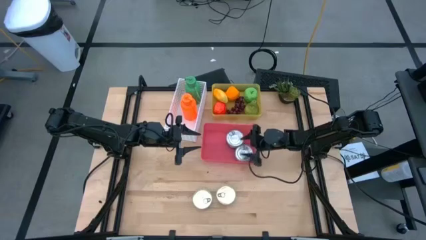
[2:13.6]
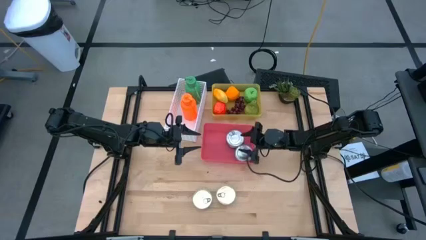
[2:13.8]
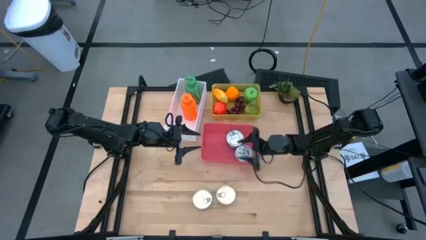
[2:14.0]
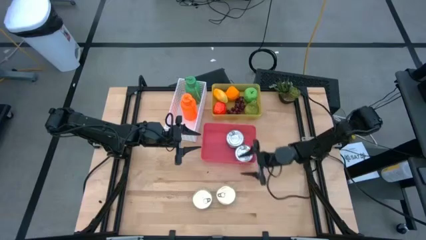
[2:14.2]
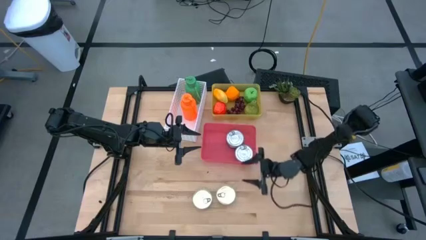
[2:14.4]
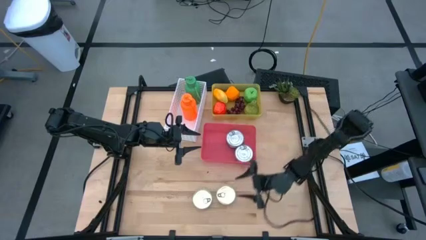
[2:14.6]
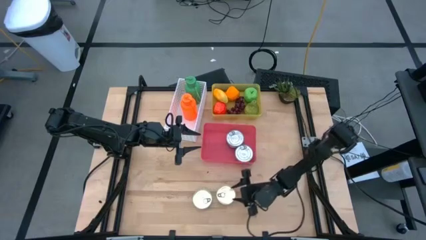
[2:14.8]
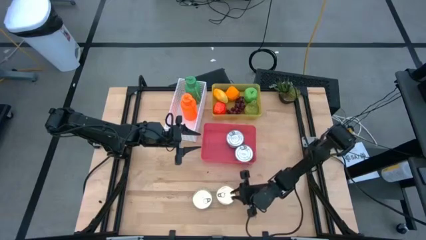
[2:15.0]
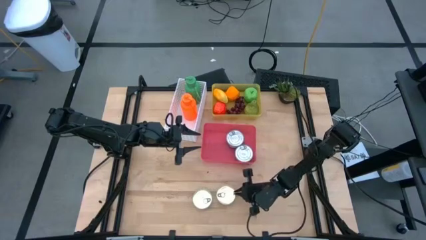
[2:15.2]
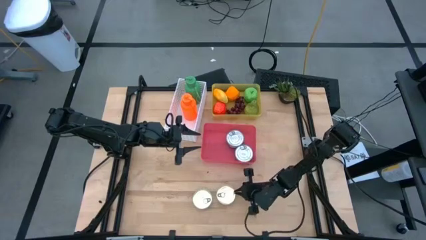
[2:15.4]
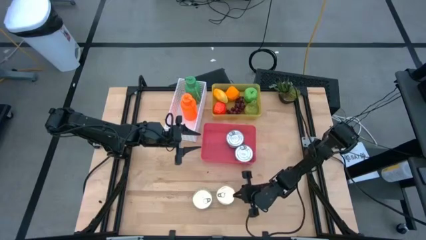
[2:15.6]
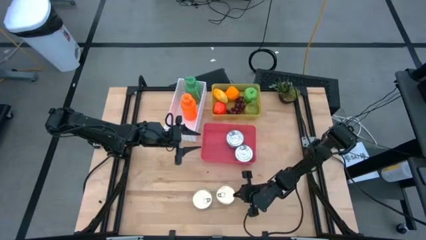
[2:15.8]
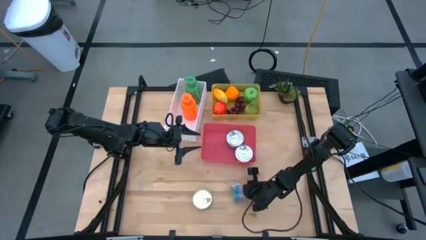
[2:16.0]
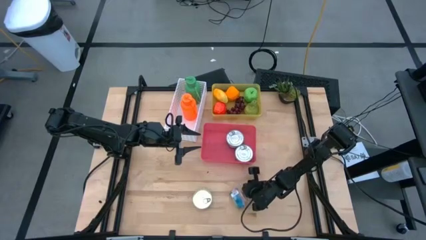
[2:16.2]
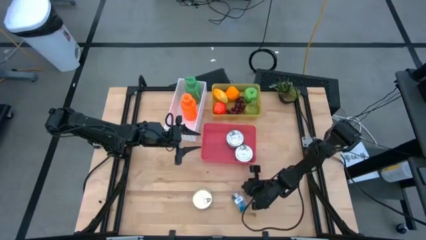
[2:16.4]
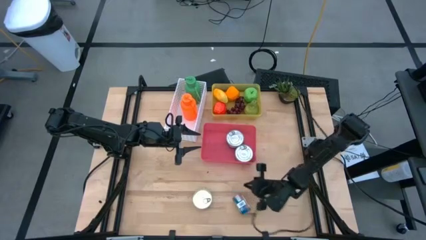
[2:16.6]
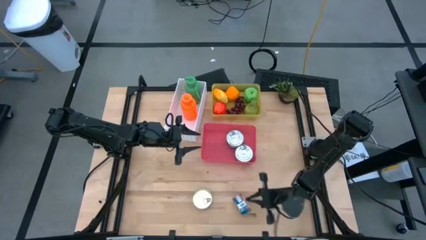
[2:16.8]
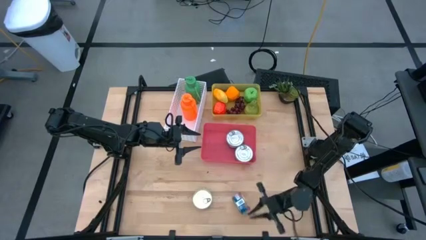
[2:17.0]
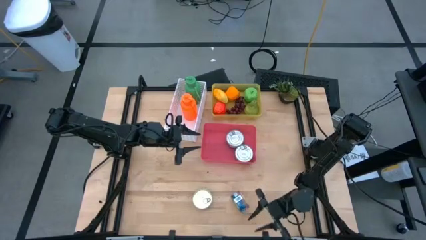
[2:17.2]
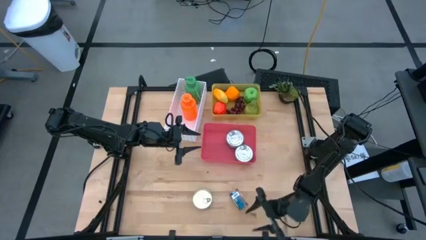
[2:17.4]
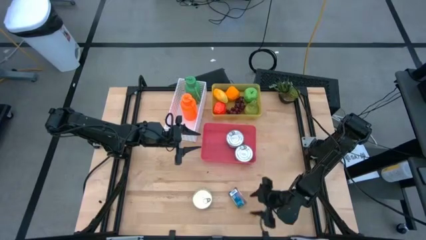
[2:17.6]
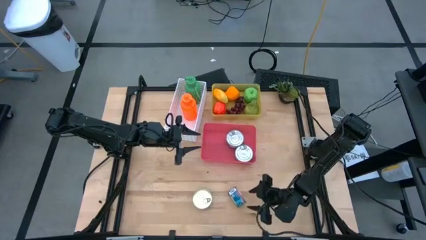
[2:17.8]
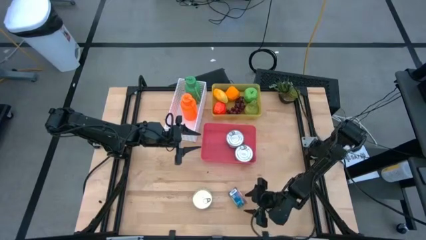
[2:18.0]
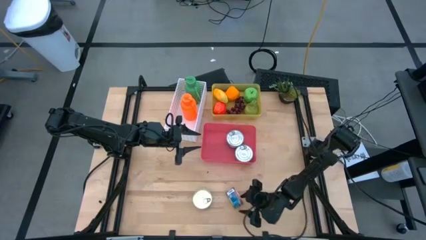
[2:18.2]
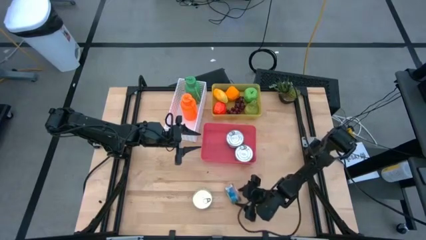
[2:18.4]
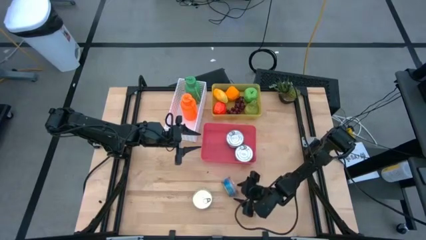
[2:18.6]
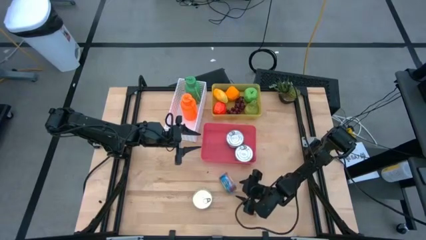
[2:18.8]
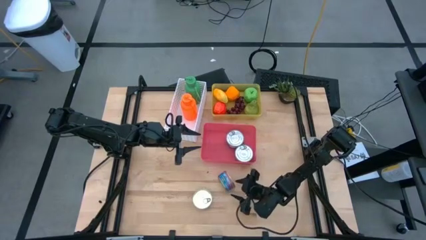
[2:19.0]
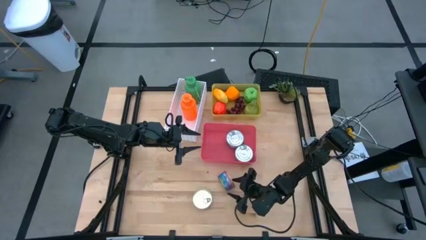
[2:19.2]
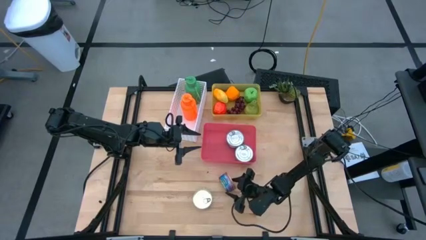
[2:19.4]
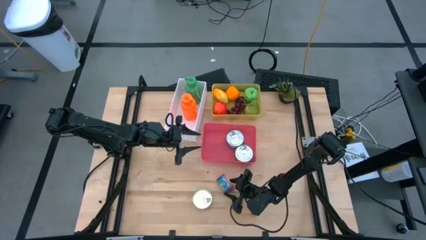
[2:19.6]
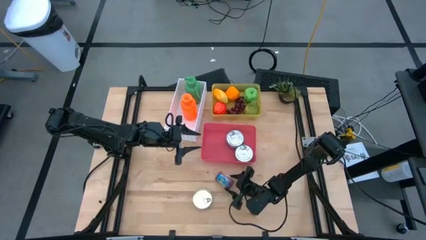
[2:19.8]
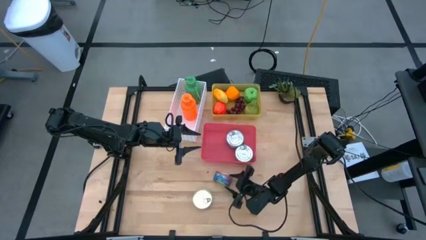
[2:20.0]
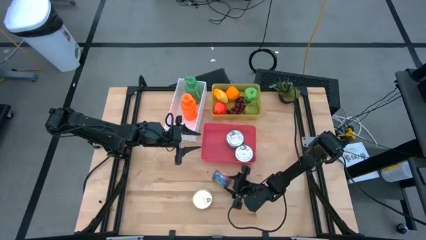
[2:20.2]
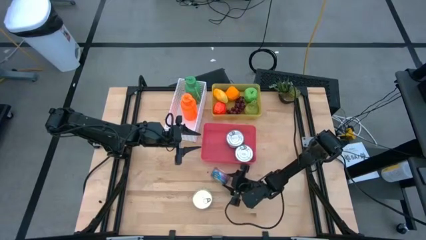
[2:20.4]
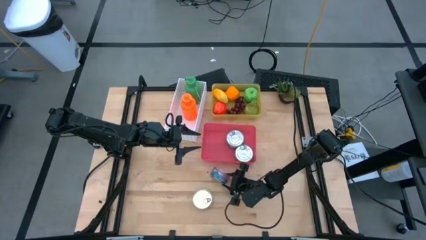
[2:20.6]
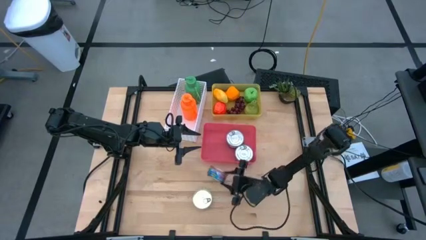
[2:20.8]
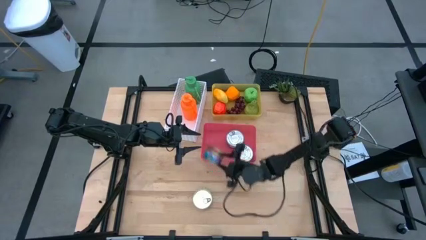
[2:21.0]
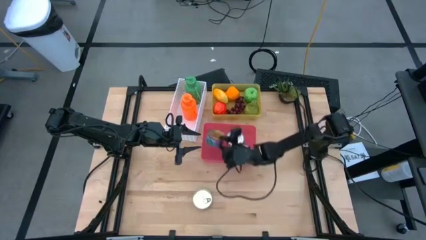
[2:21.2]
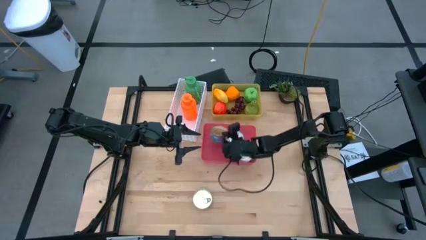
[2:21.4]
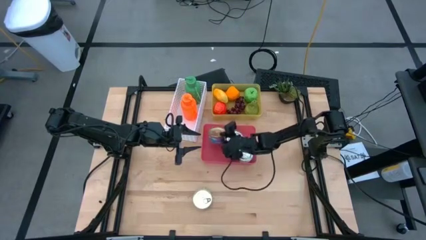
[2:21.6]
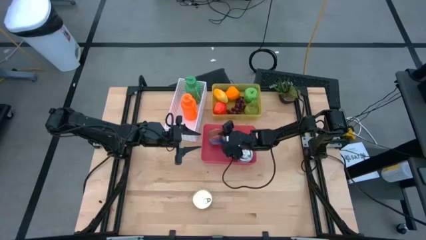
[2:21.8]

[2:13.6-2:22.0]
Task: Pick & Place Food Item
Put the right blue and pink tuna can into the red bin

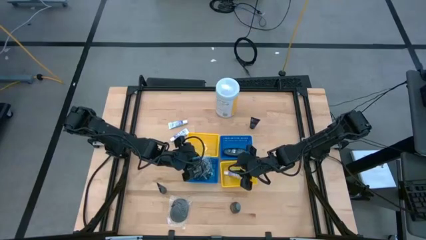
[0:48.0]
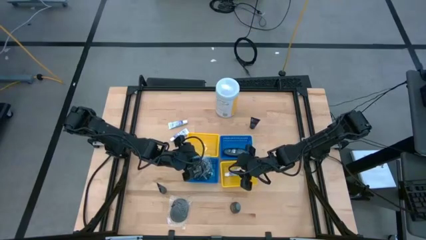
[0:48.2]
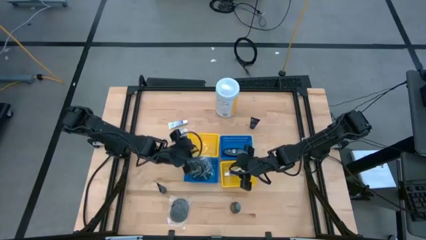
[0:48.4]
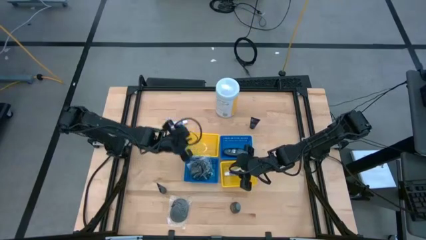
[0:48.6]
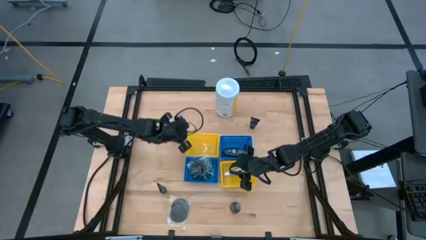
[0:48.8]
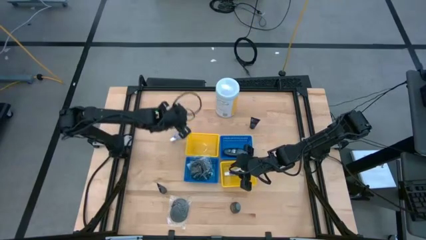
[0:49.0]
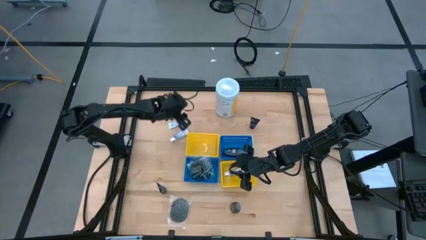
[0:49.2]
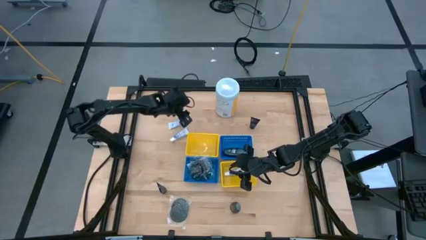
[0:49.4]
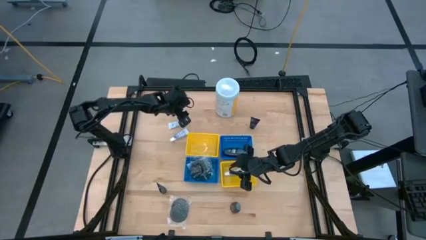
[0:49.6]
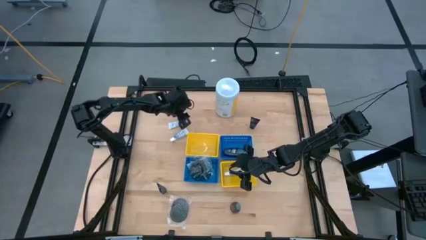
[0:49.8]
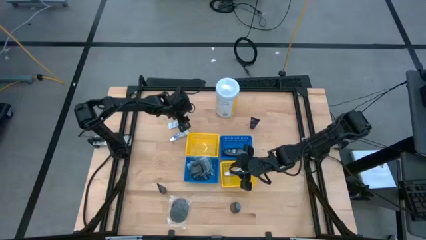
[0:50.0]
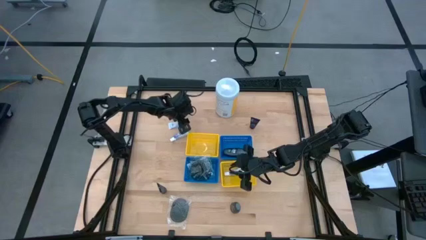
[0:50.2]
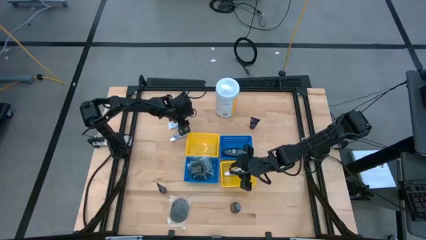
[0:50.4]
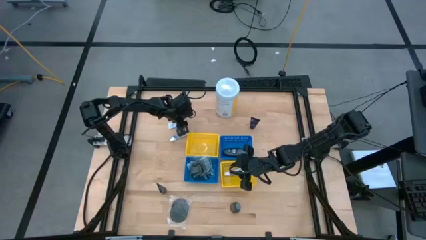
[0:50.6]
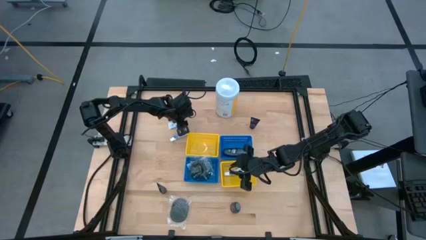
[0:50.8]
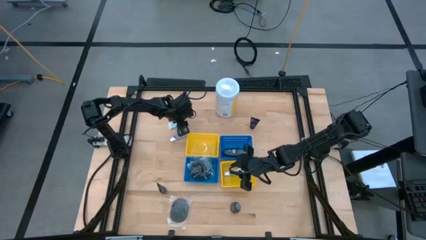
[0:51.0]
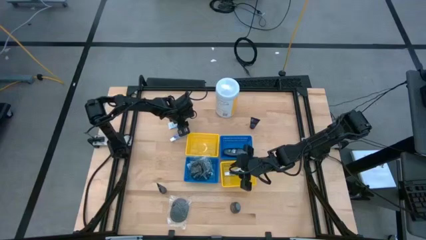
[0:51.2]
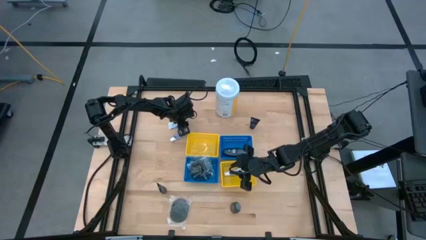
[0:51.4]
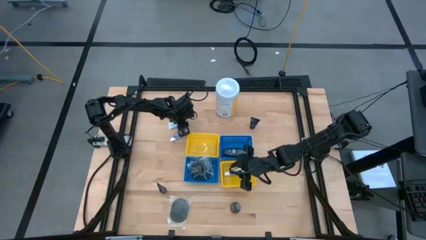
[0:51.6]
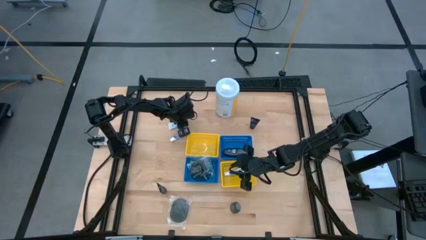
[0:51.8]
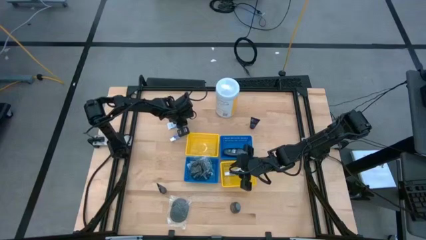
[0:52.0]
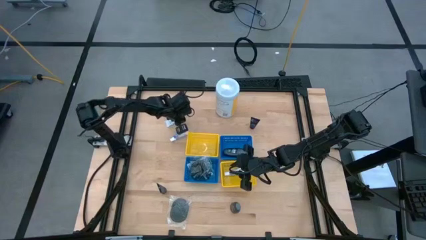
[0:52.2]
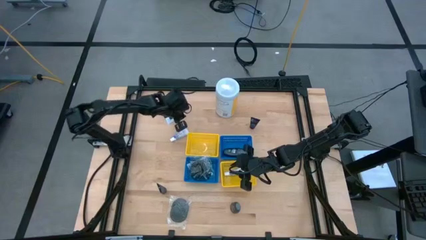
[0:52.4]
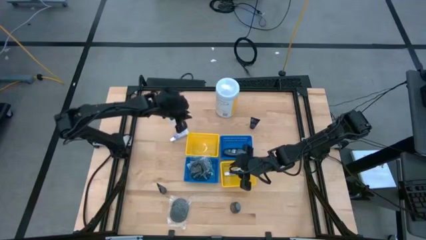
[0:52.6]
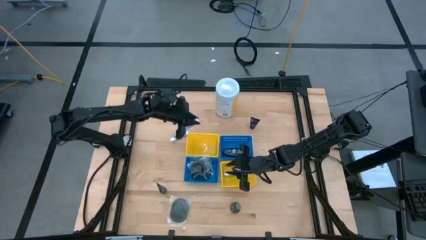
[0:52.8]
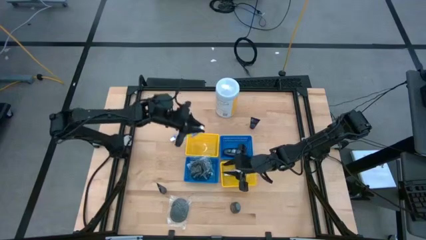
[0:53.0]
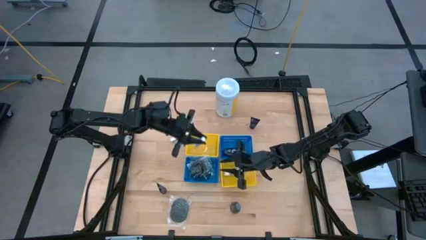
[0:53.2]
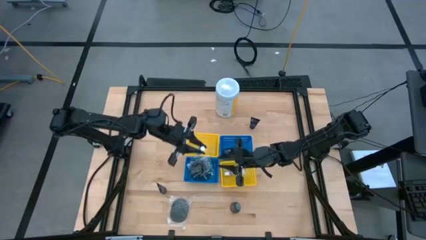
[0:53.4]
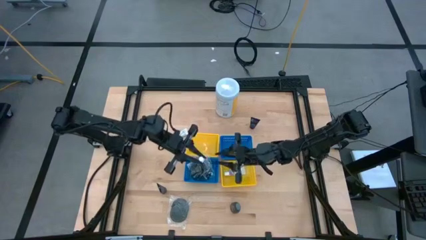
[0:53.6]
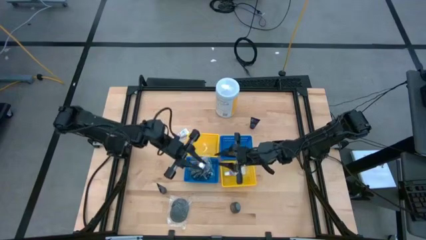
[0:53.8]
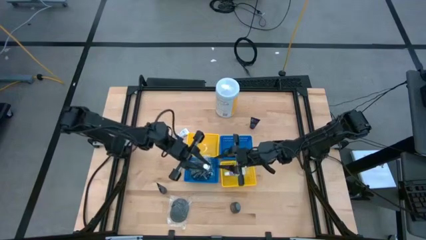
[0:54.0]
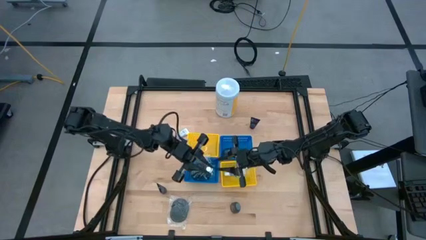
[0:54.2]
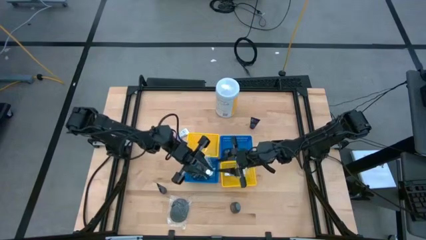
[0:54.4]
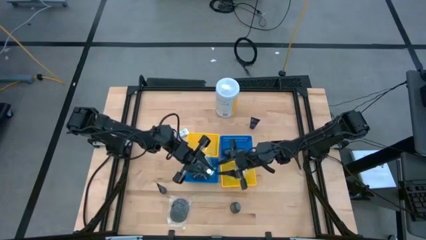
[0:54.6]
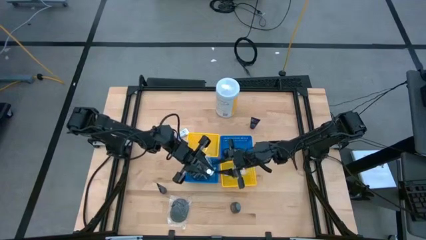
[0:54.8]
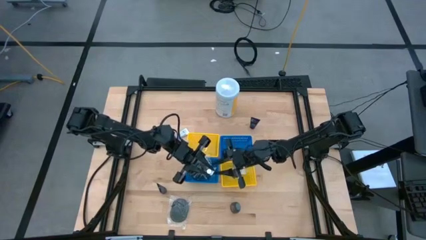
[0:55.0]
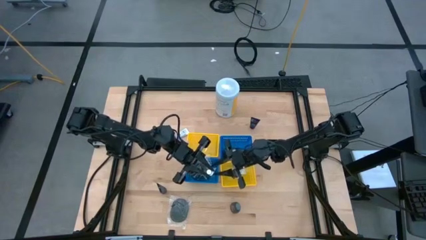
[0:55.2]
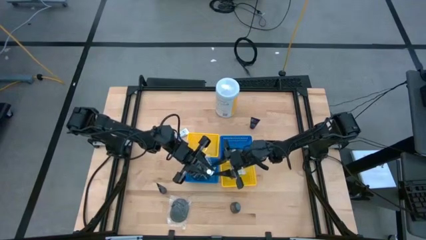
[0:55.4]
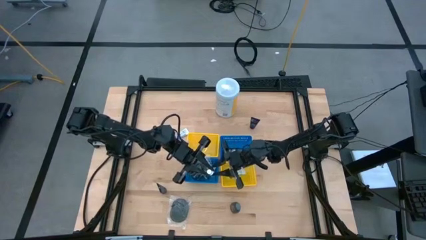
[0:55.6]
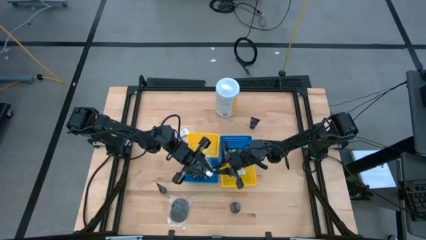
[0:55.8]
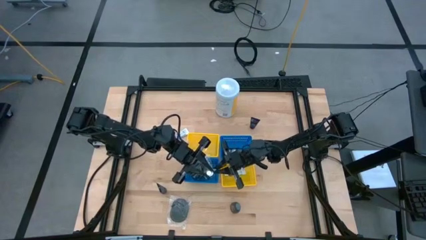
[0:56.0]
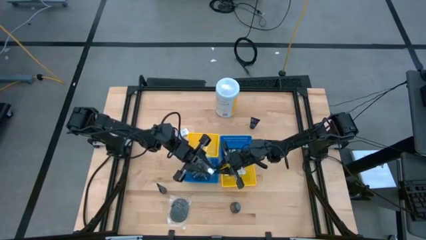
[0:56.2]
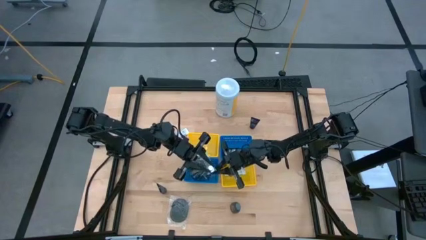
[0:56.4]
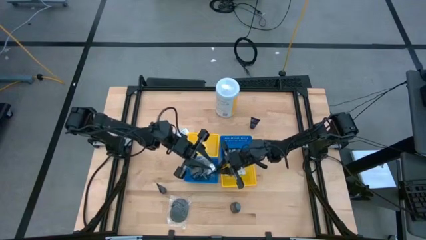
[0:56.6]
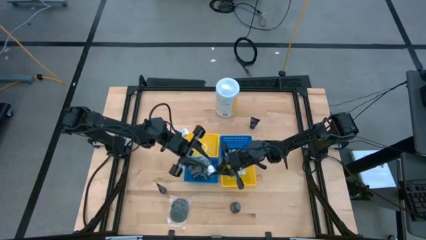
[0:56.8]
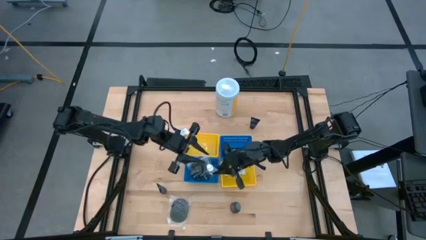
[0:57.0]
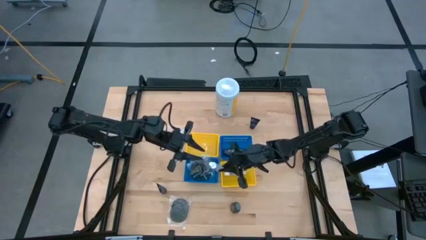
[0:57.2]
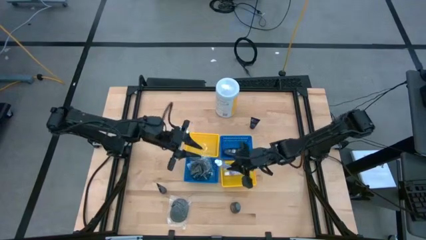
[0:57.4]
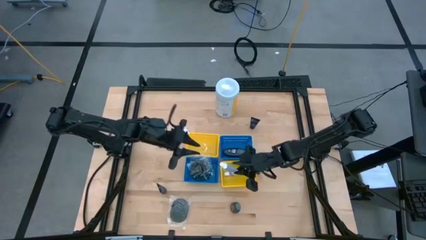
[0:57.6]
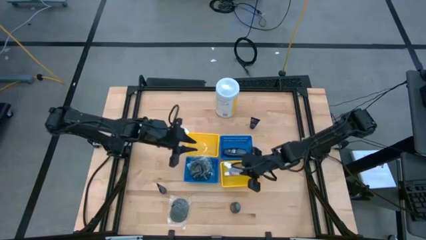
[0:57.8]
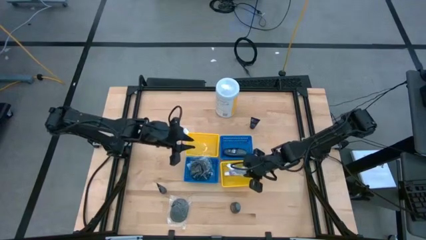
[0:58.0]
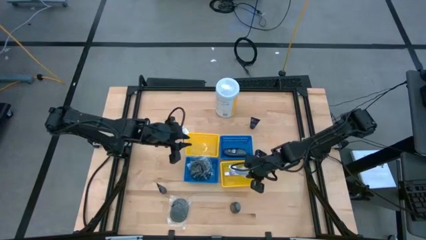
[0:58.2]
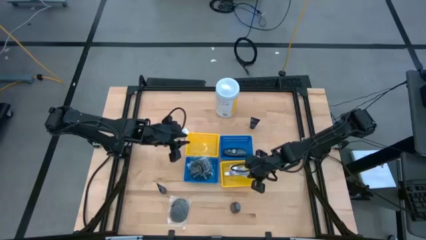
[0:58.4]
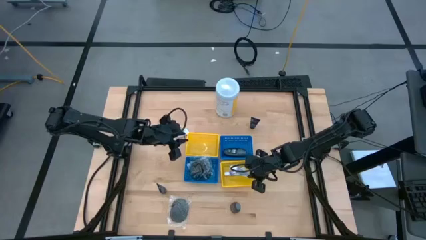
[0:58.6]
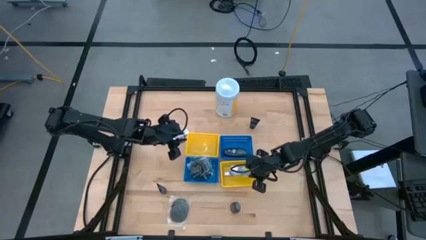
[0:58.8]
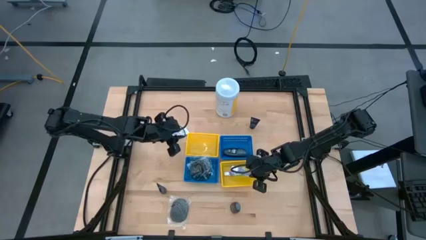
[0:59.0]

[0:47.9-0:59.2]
Task: Pick & Place Travel size toiletries
Put the white toothpaste into the bottom yellow bin
